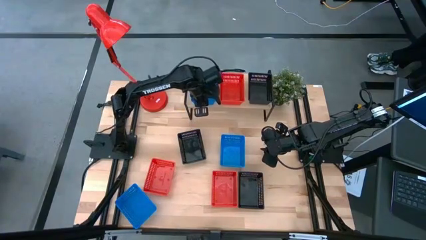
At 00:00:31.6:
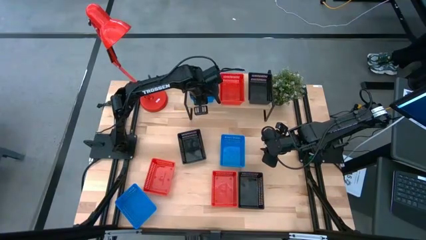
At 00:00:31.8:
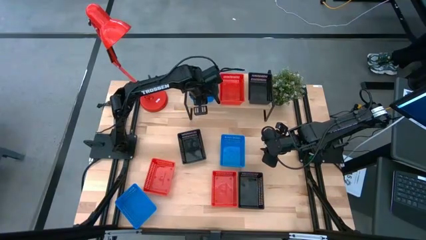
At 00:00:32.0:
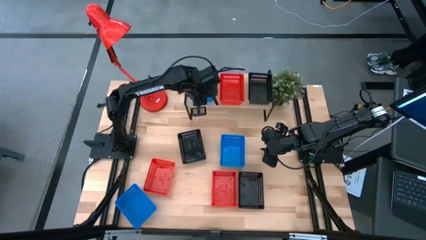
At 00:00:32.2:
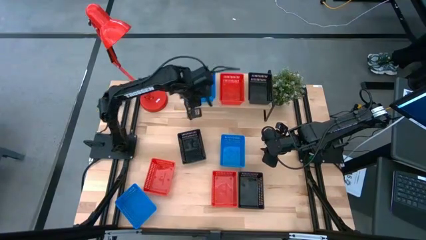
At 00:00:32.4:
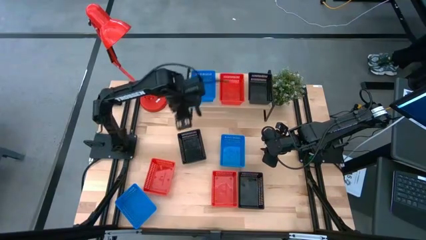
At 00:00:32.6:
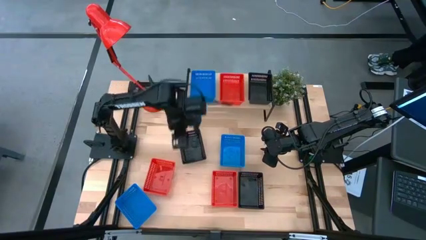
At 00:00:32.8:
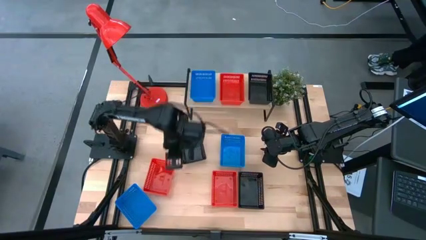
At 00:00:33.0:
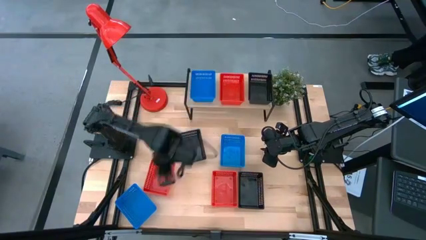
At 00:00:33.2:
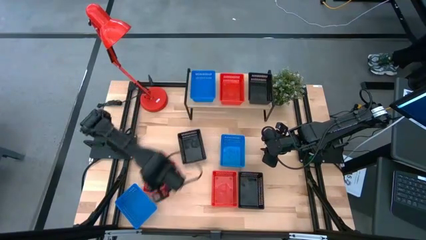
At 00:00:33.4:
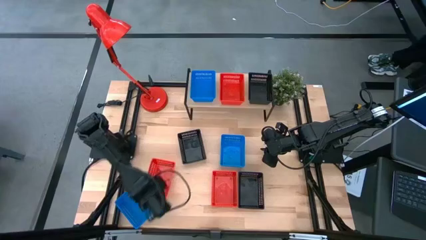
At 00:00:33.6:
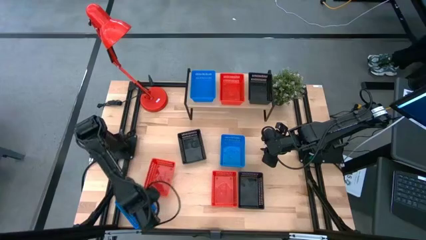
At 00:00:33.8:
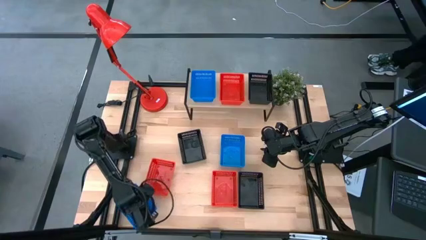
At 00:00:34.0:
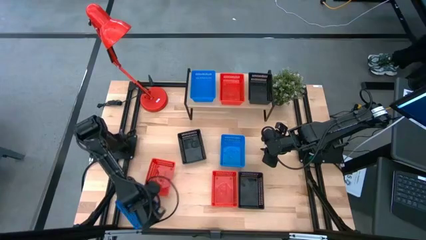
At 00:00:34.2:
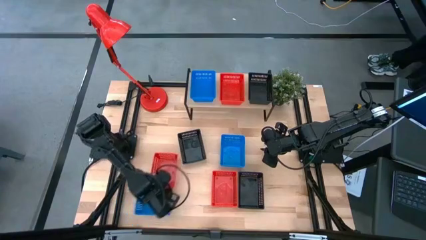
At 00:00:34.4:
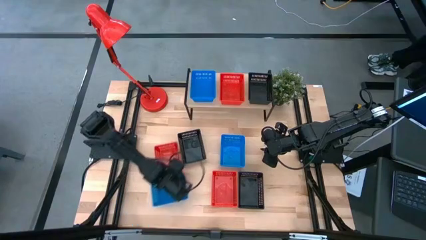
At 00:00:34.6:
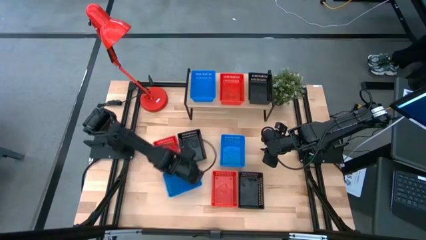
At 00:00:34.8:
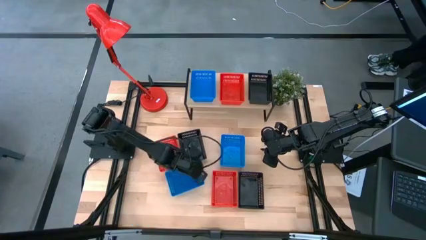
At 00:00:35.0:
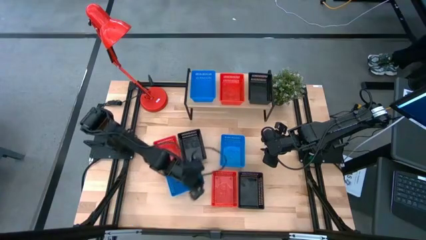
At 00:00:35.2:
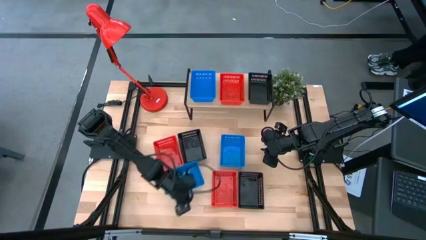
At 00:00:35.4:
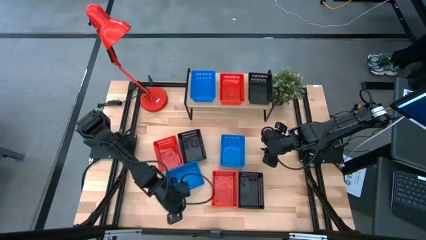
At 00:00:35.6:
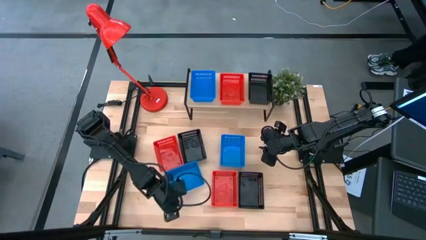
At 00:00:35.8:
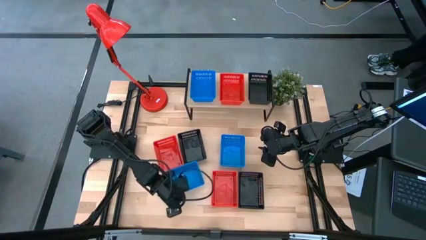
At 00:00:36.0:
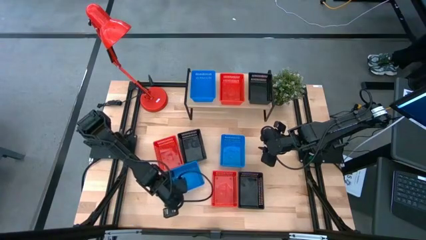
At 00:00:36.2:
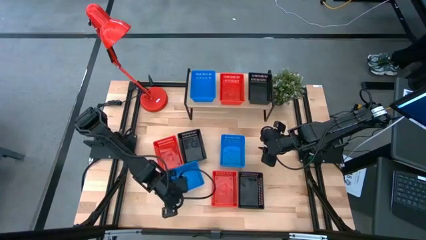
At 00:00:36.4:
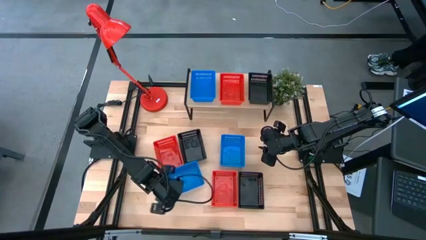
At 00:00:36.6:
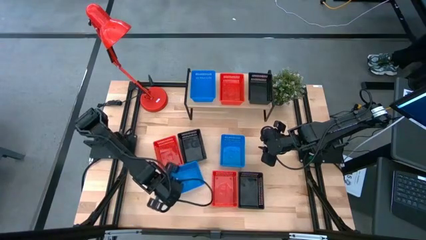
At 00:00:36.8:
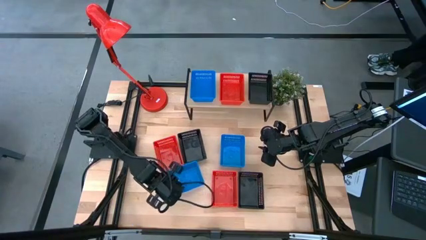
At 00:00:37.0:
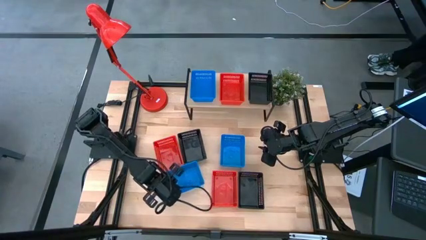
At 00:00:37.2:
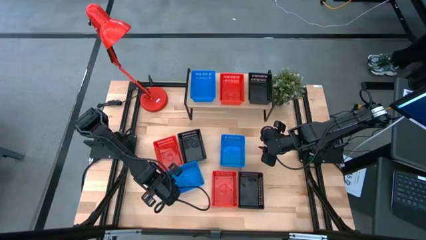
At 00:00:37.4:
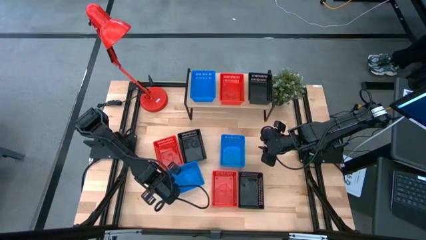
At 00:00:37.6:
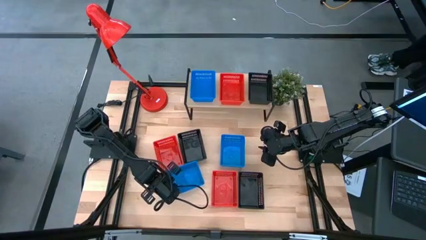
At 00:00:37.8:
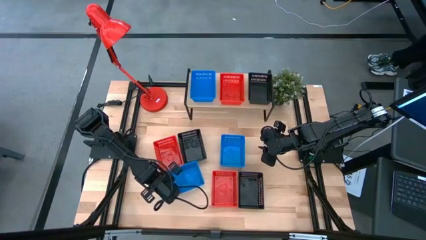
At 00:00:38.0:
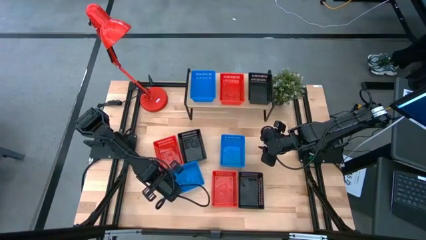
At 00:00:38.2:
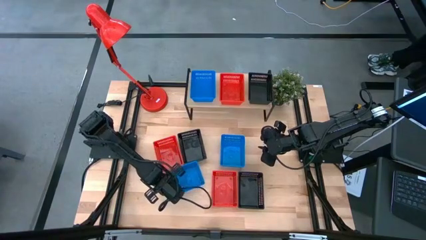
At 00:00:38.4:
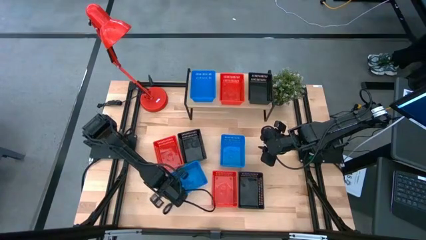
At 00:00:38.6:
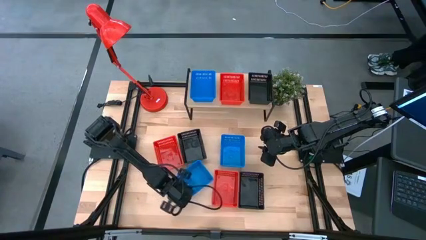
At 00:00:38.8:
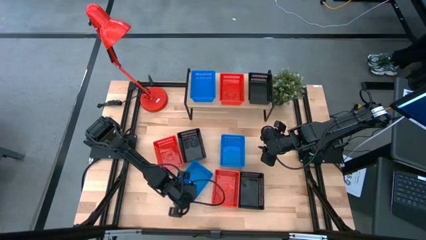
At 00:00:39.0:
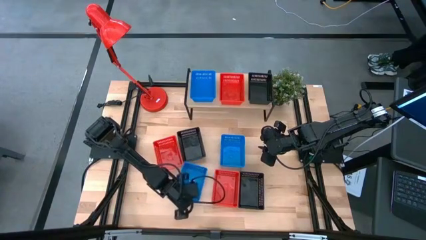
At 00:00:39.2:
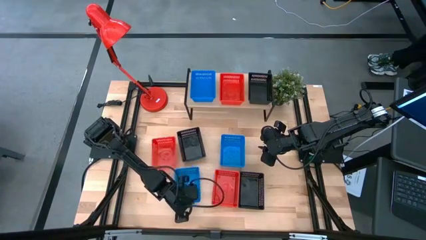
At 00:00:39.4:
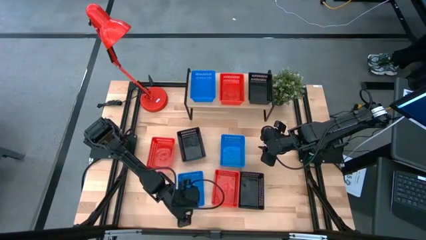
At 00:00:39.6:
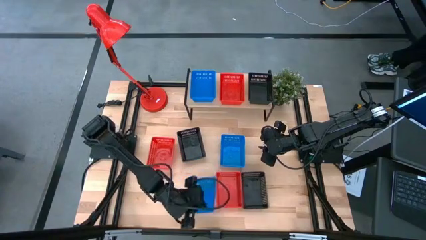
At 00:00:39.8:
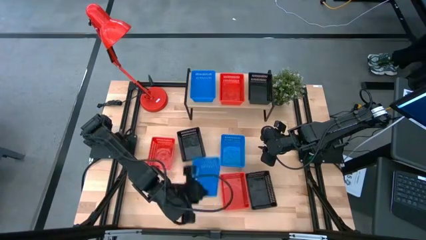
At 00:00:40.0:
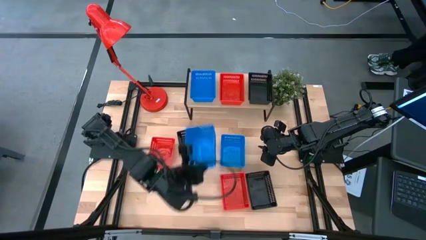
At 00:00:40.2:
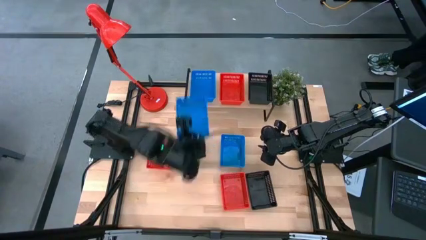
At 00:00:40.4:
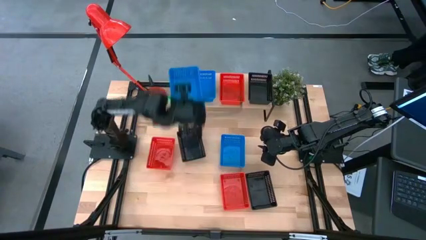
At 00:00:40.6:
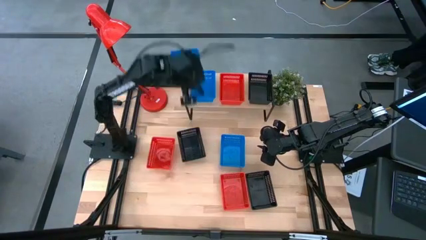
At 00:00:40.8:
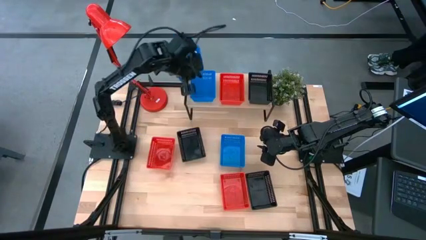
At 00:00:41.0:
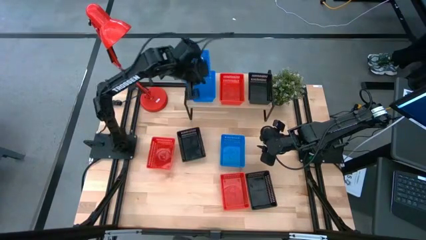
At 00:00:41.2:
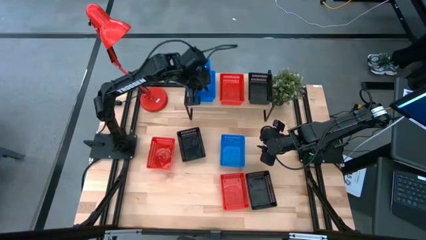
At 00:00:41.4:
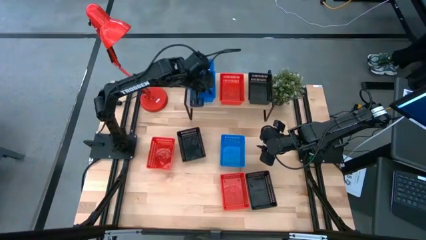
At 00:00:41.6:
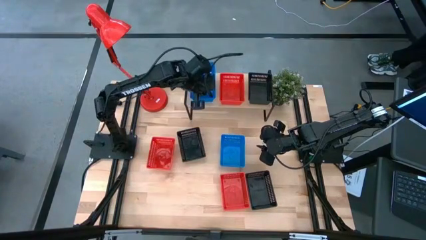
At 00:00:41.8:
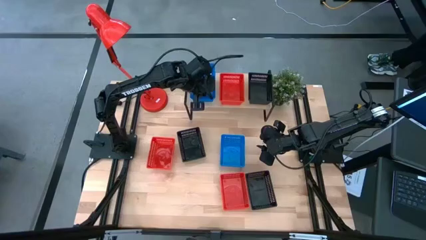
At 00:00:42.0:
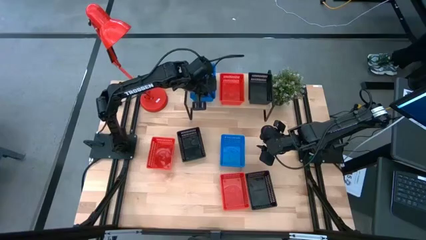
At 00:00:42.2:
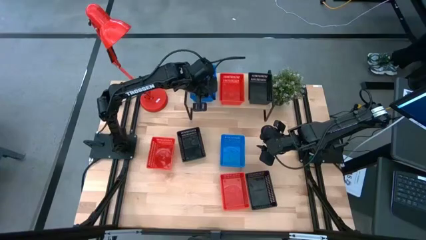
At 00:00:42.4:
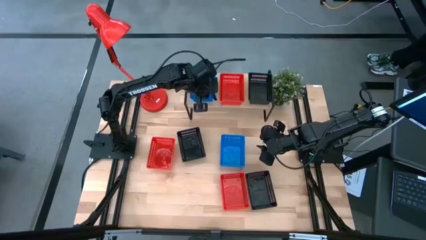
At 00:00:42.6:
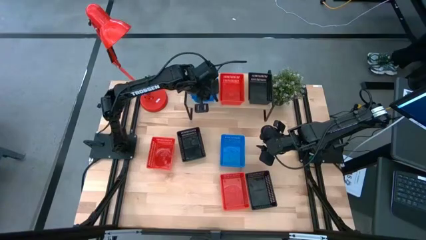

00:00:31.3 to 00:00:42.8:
Task: Stack baskets on shelf by color
Stack the left blue bin on top of the blue bin on the shelf
